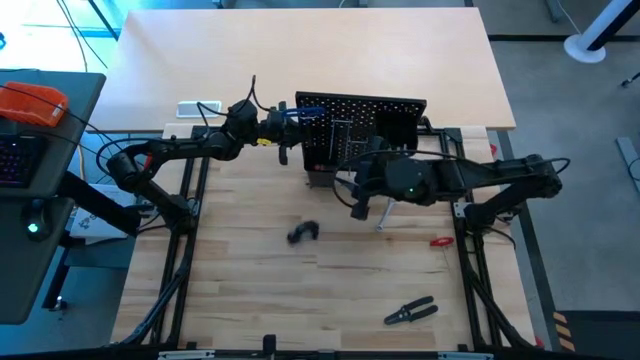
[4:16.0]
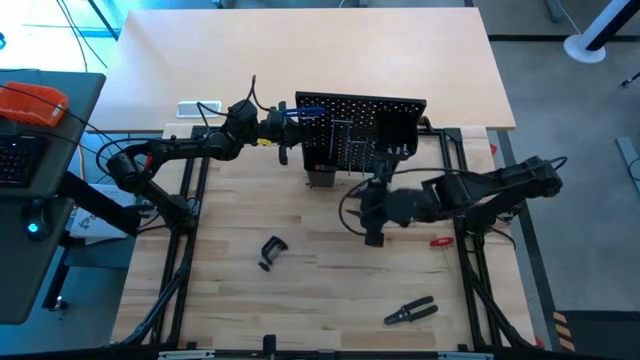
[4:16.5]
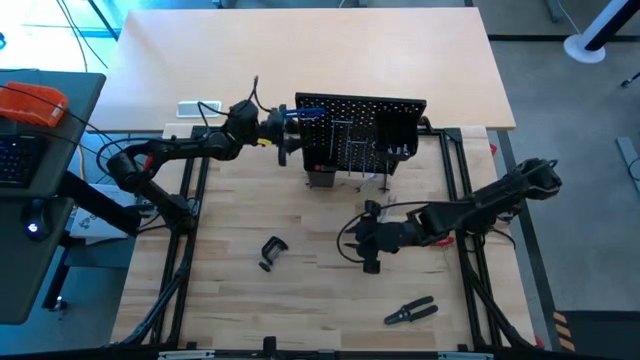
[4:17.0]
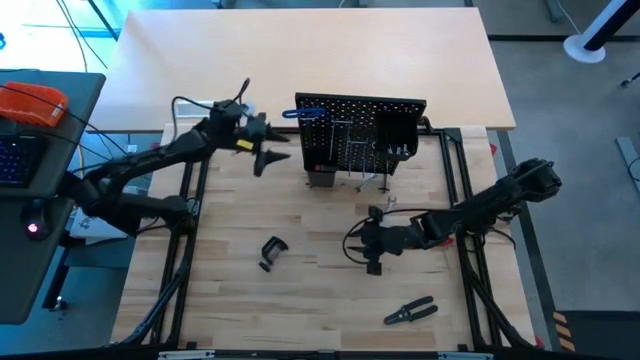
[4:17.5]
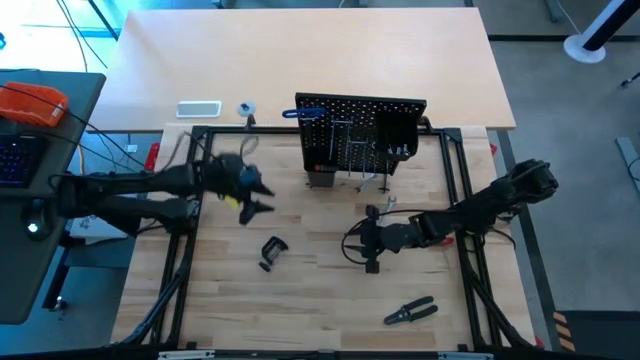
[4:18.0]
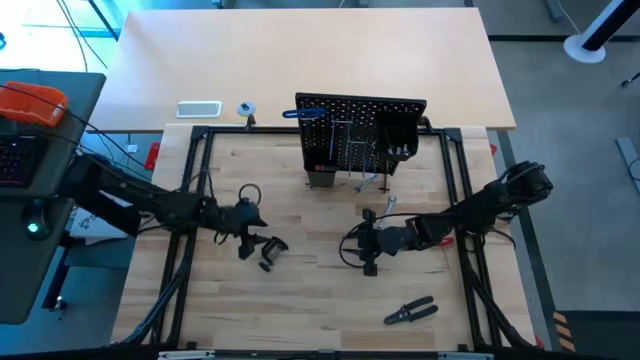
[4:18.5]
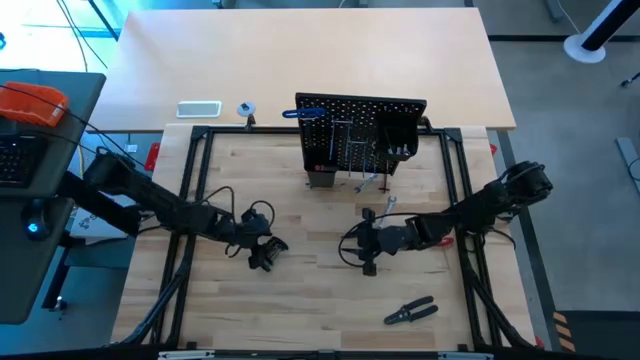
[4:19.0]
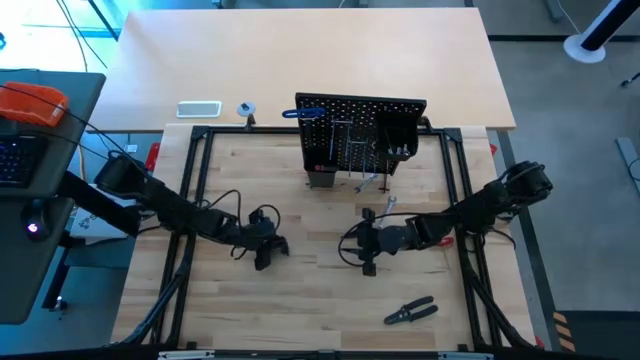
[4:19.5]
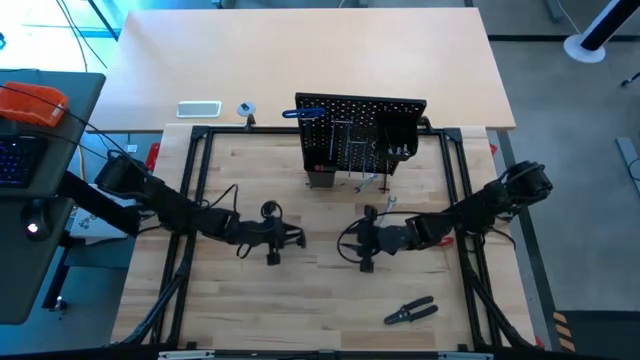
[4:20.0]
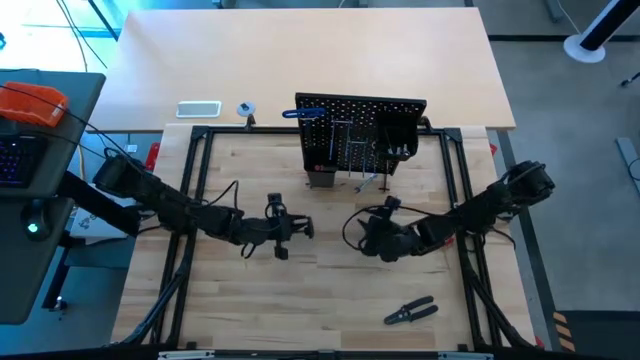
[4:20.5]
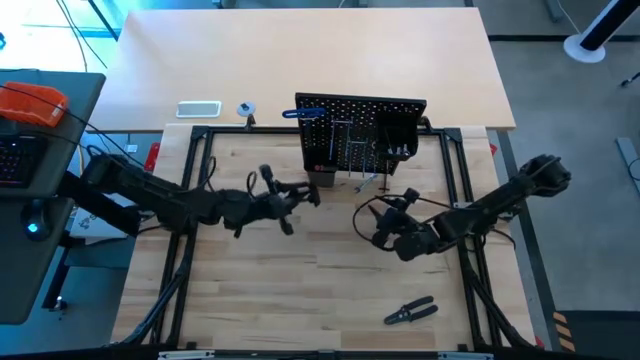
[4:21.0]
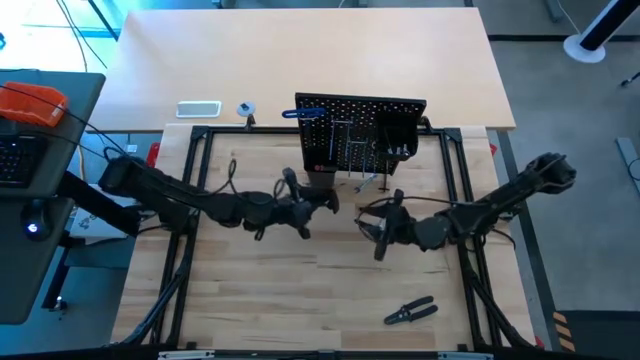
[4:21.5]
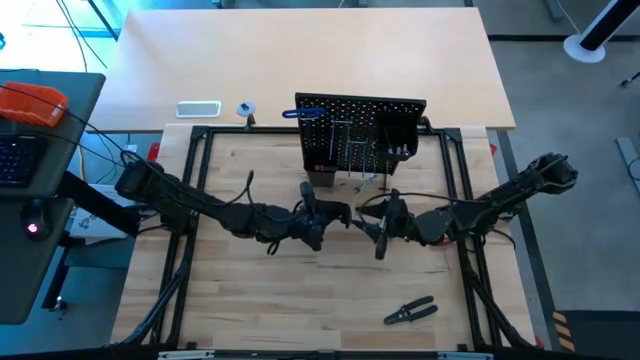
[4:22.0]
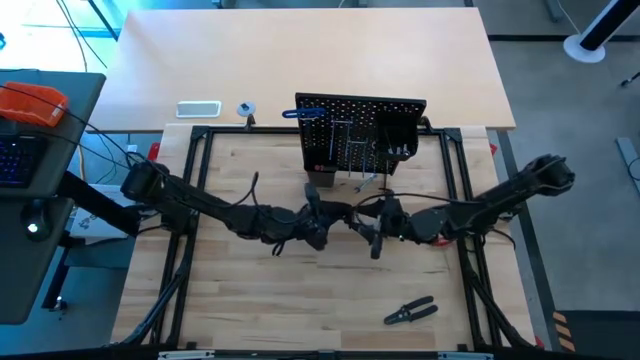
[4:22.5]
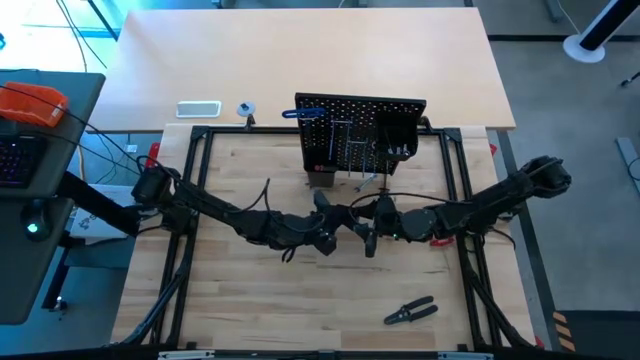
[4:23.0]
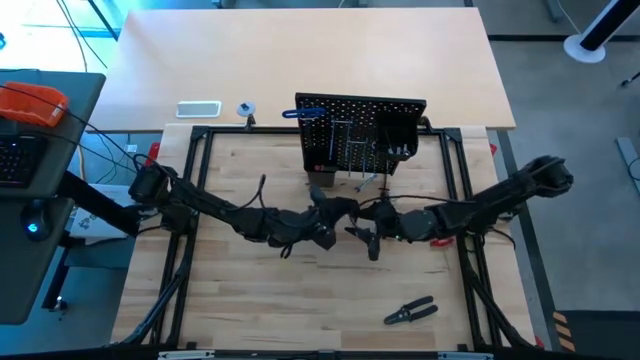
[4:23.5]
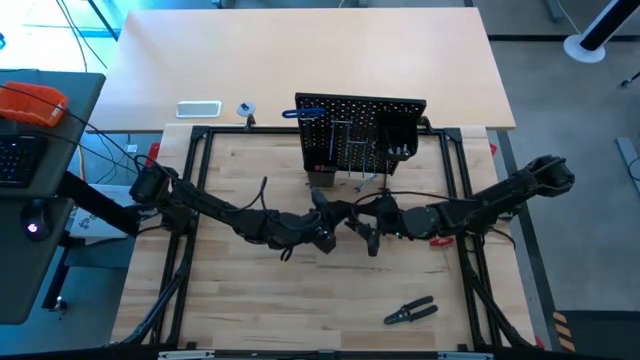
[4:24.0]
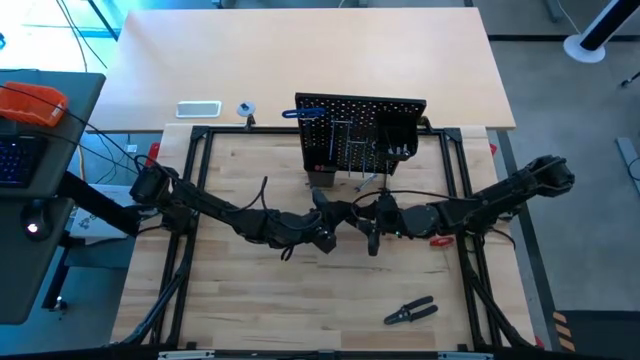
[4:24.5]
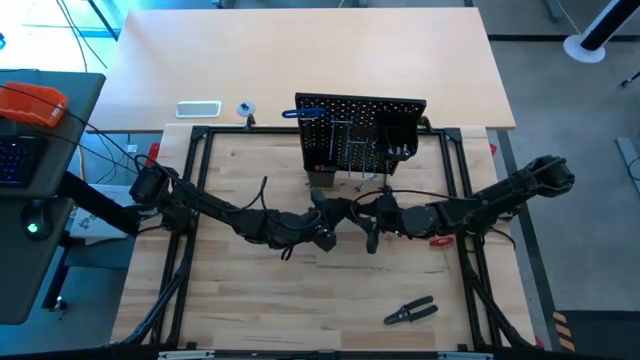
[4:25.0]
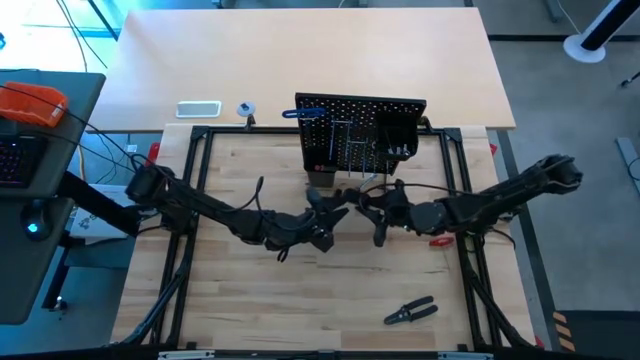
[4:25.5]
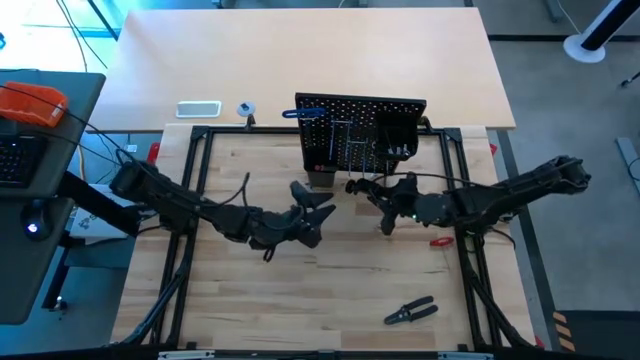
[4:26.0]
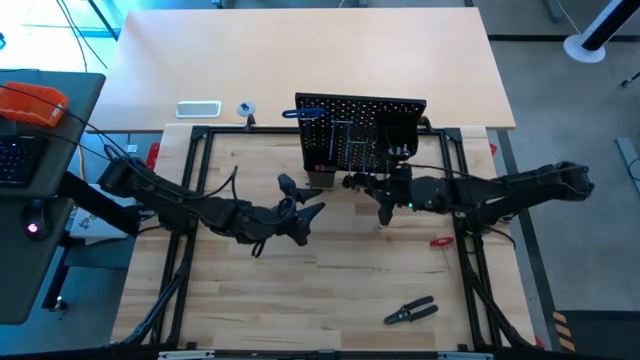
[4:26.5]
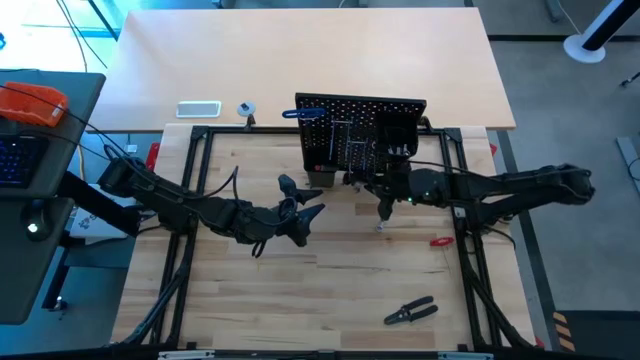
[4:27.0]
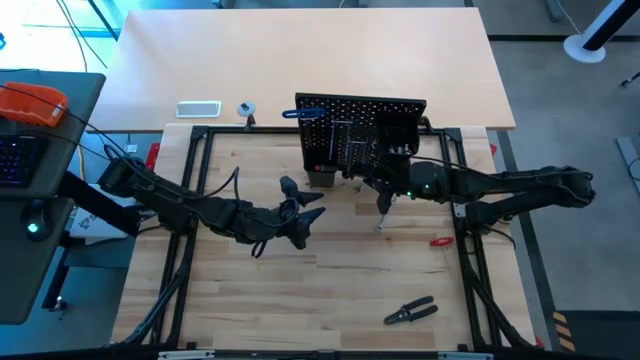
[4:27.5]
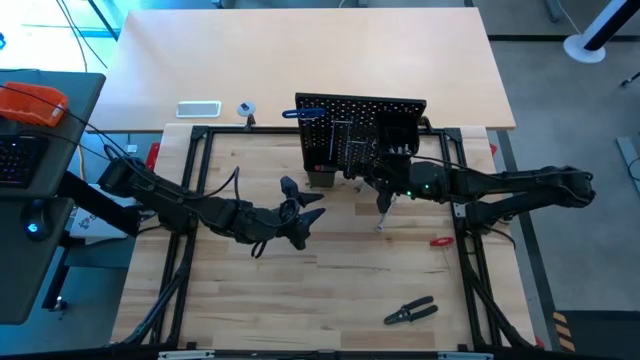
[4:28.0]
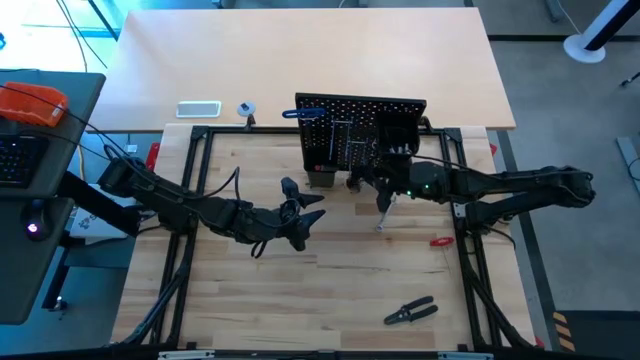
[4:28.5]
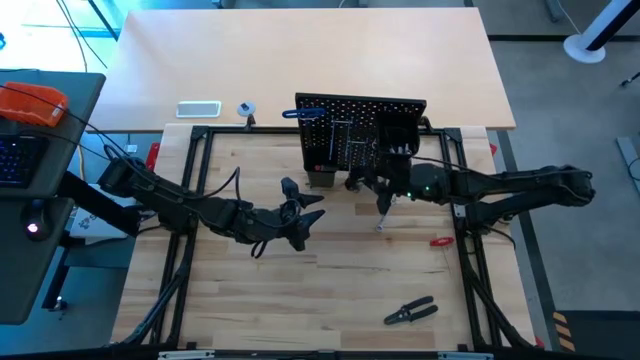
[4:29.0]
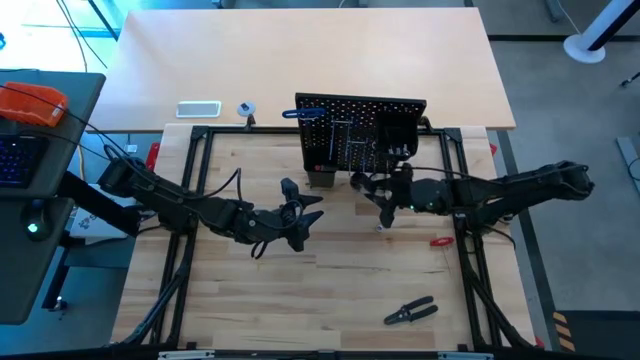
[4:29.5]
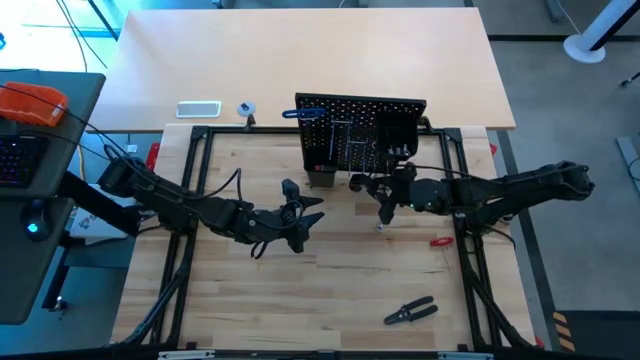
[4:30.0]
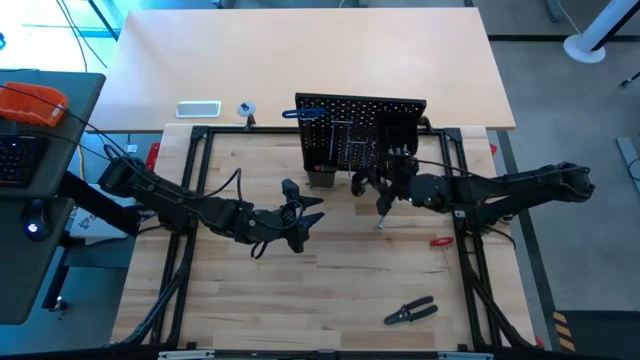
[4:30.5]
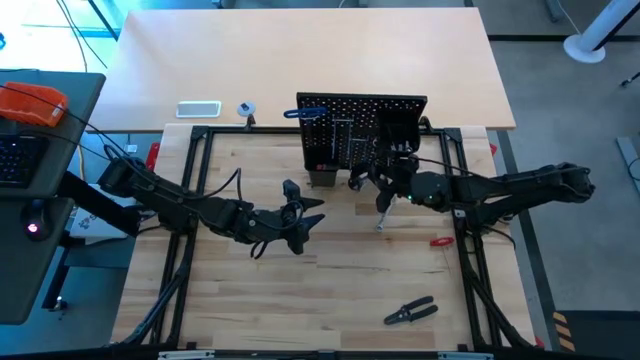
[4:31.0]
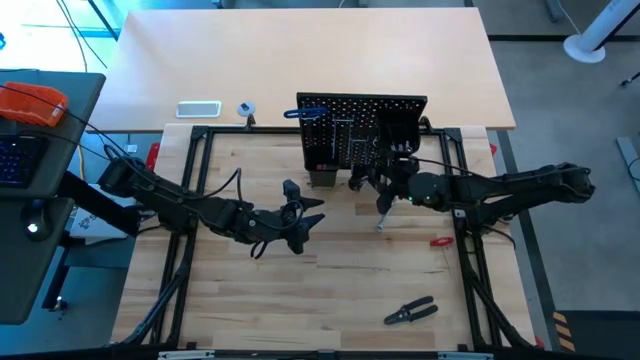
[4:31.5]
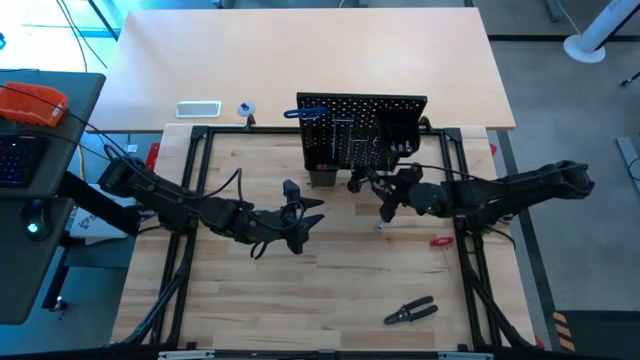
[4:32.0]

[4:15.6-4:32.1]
Task: Hang tools onto peg board
Hang the c-clamp on the pegboard

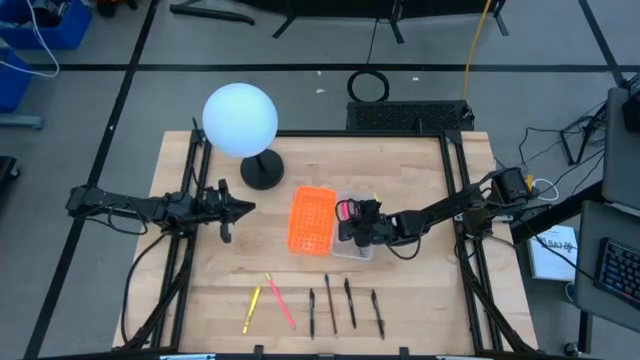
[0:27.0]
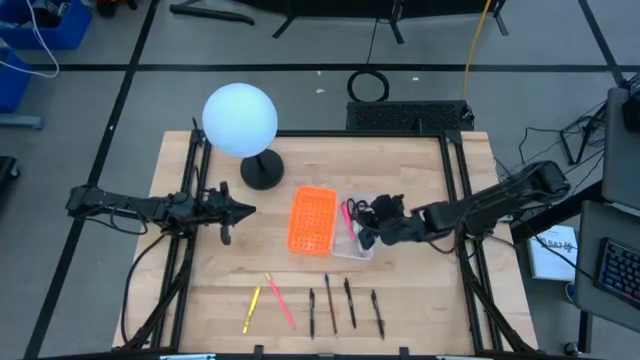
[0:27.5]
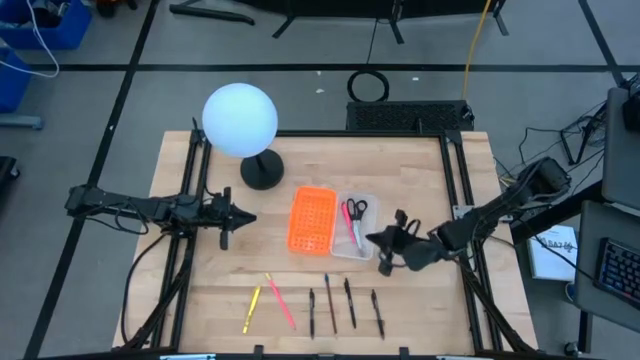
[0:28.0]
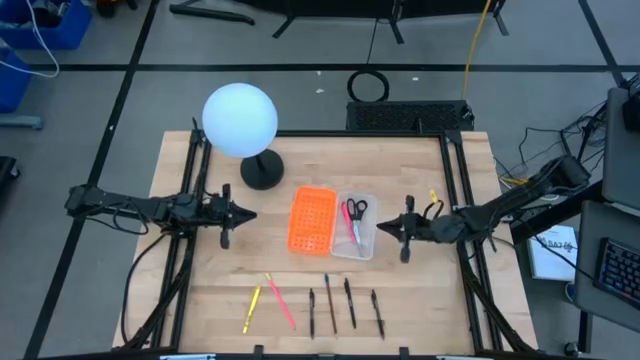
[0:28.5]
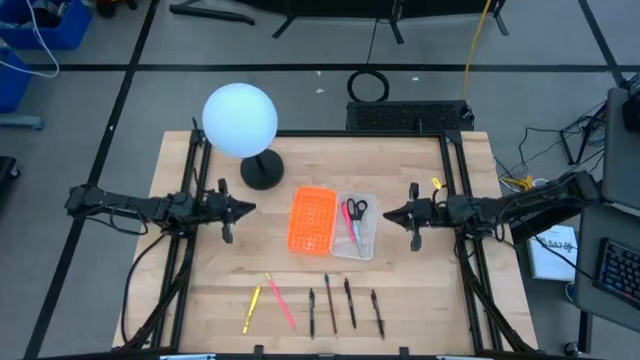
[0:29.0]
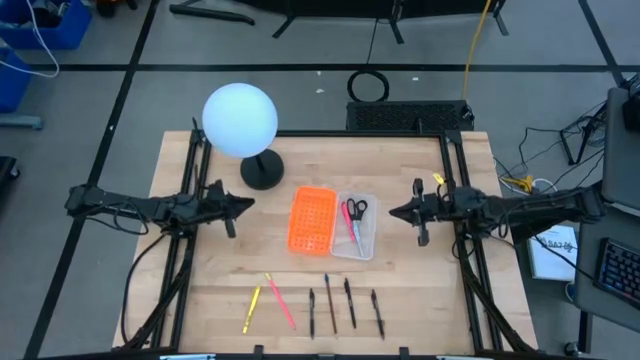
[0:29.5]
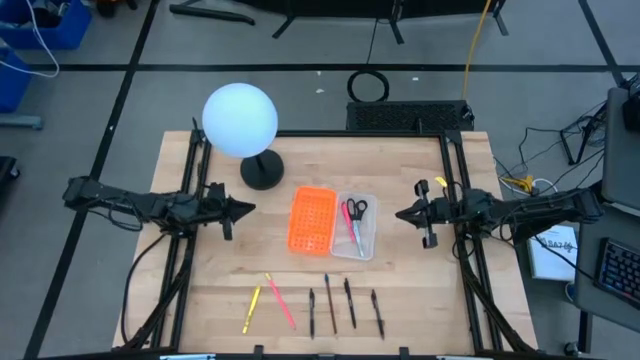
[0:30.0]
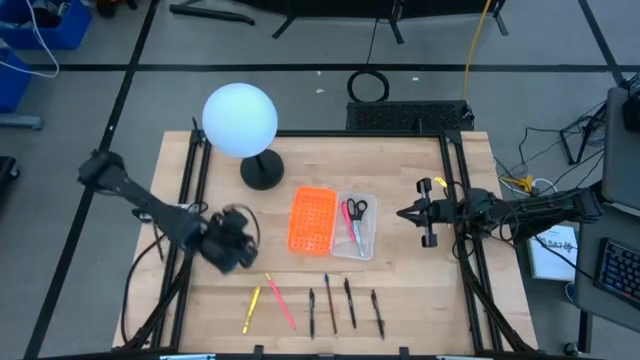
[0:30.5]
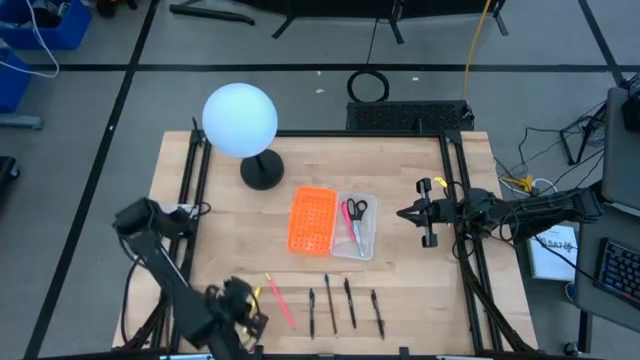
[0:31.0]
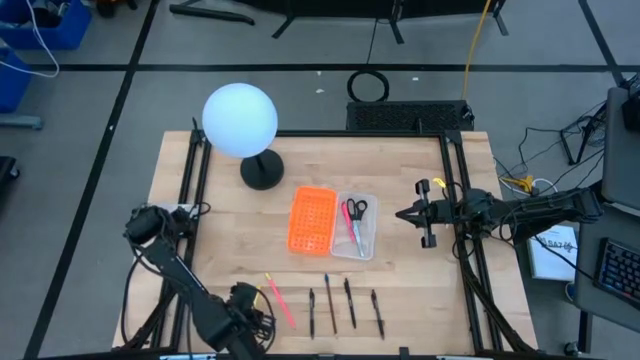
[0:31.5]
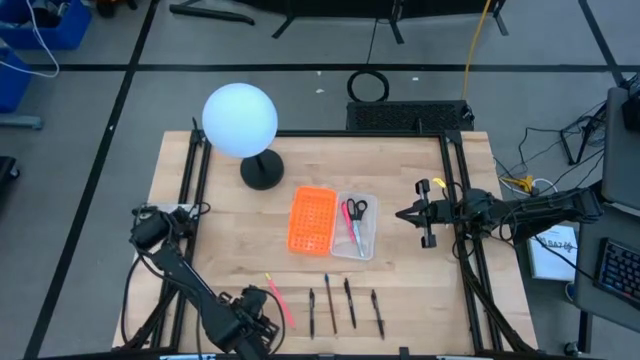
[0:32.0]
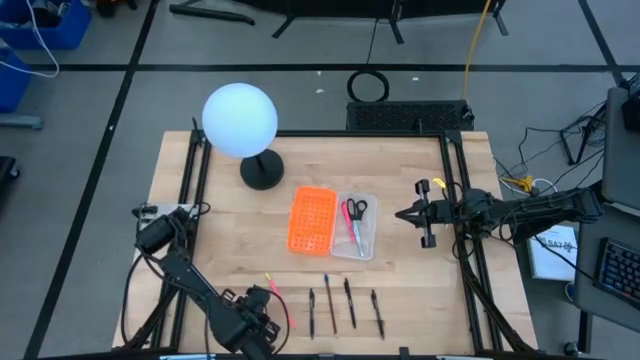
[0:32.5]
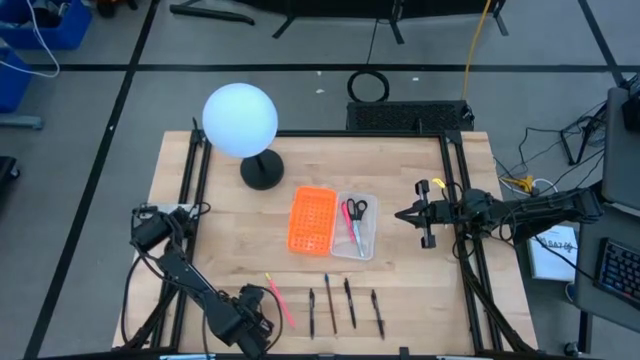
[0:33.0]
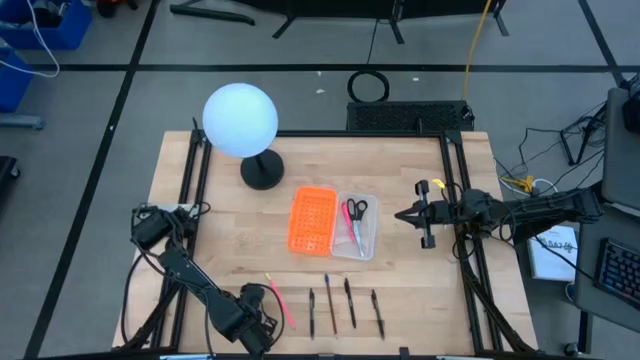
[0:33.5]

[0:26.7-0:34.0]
Task: Pick & place school supplies into a supply box
Put the yellow pen into the orange supply box
